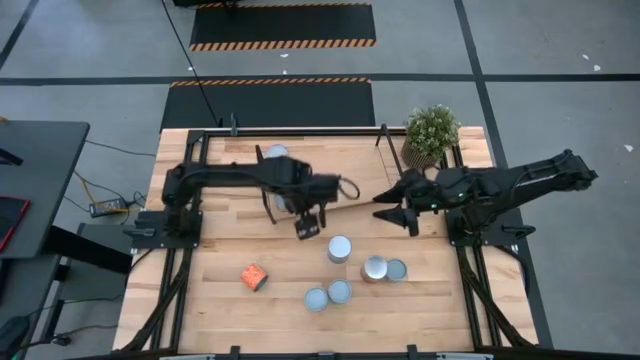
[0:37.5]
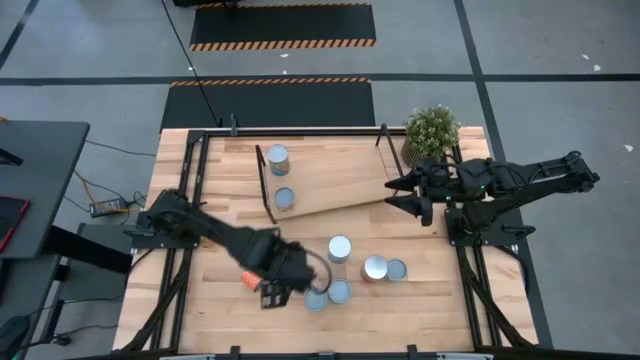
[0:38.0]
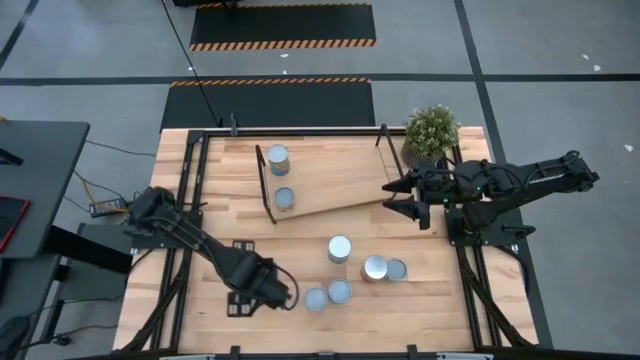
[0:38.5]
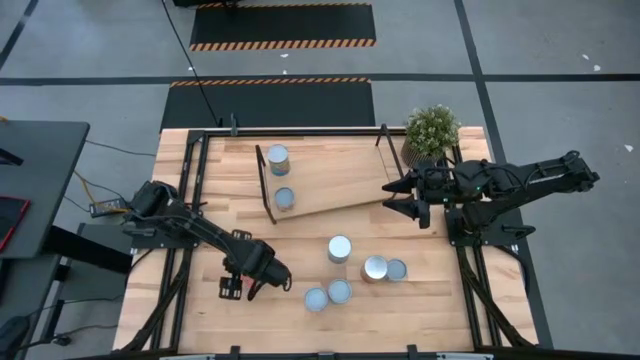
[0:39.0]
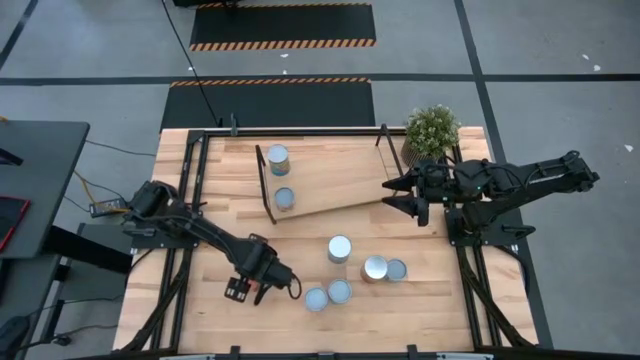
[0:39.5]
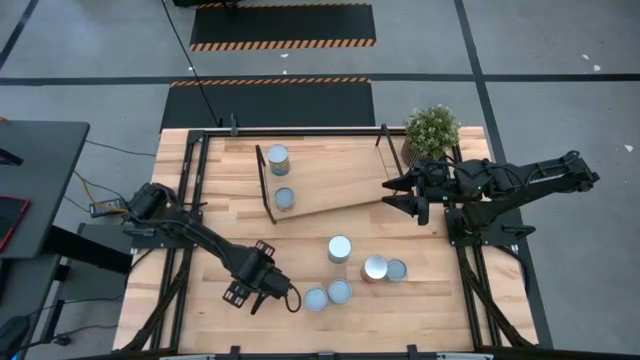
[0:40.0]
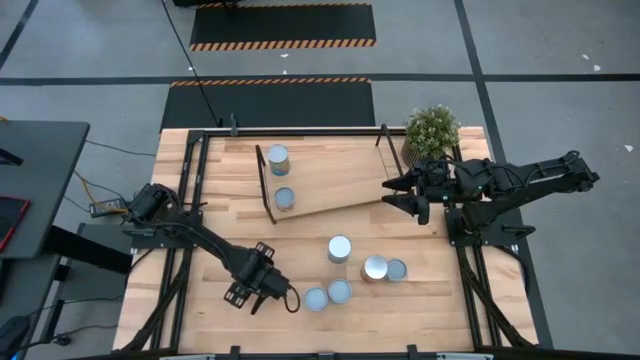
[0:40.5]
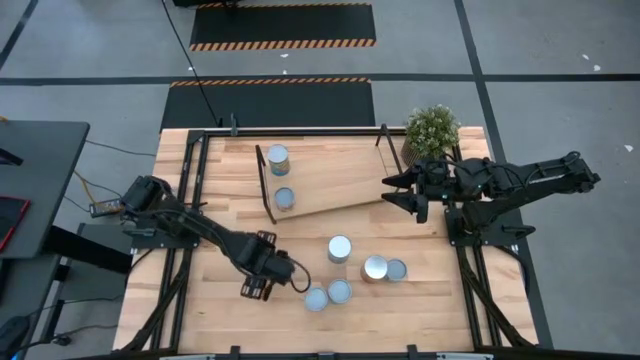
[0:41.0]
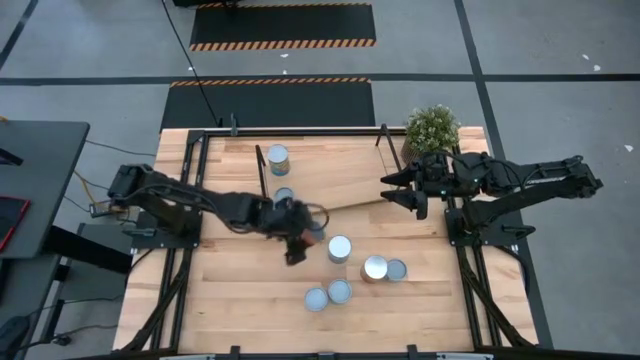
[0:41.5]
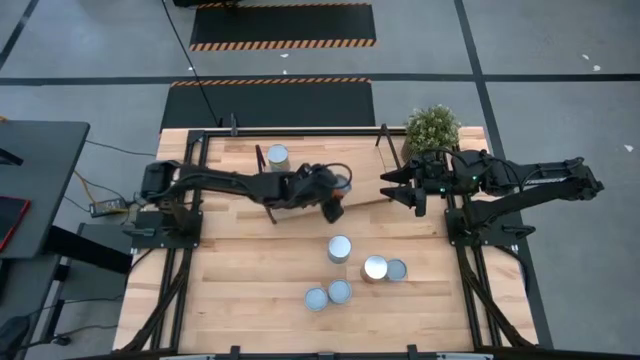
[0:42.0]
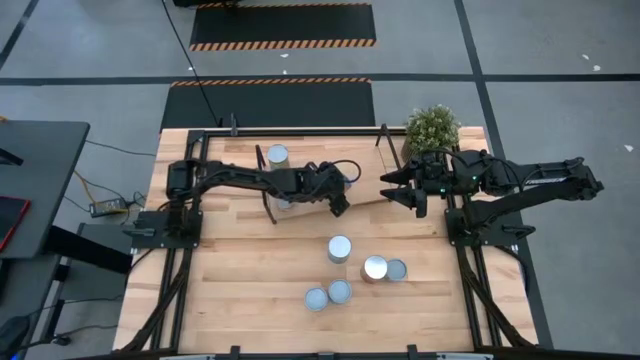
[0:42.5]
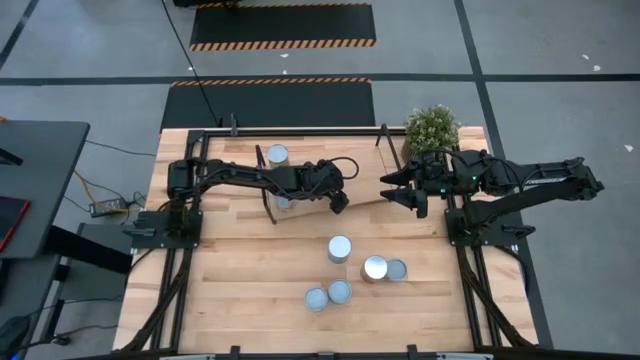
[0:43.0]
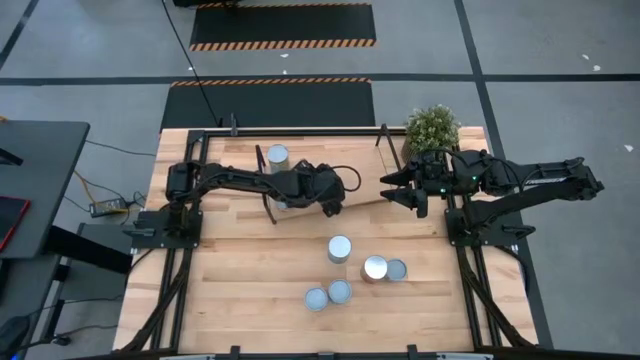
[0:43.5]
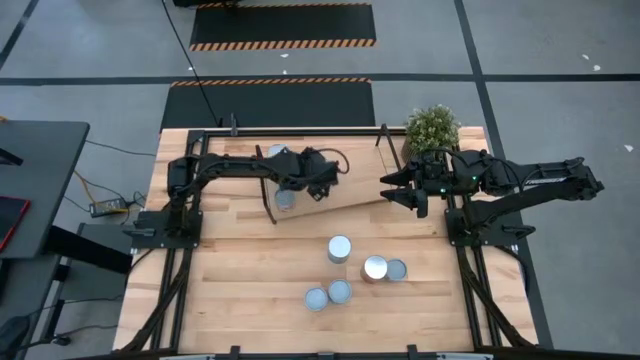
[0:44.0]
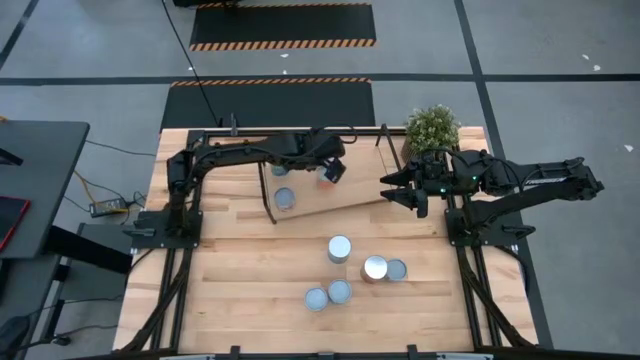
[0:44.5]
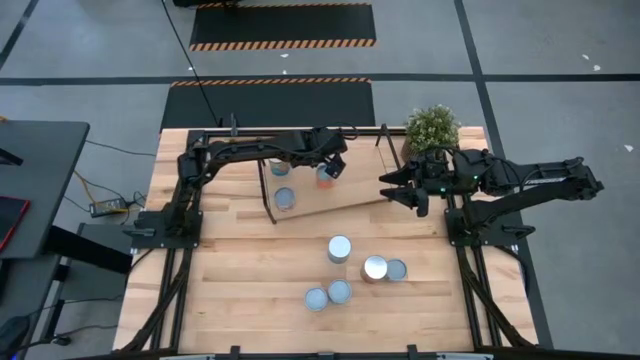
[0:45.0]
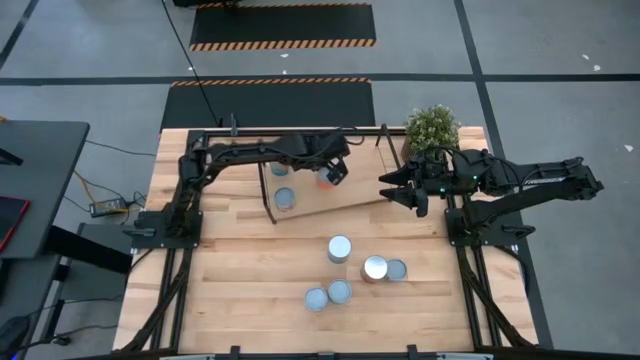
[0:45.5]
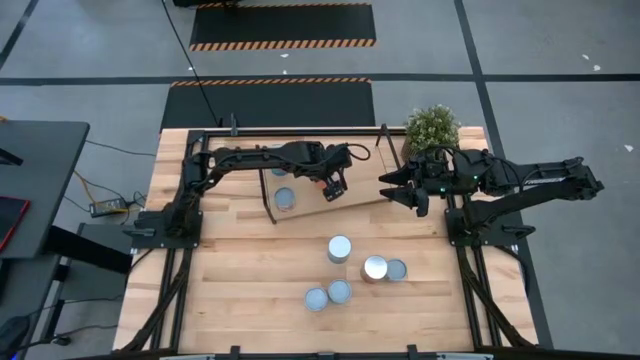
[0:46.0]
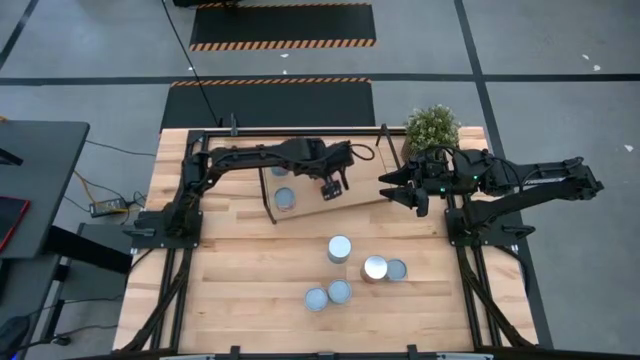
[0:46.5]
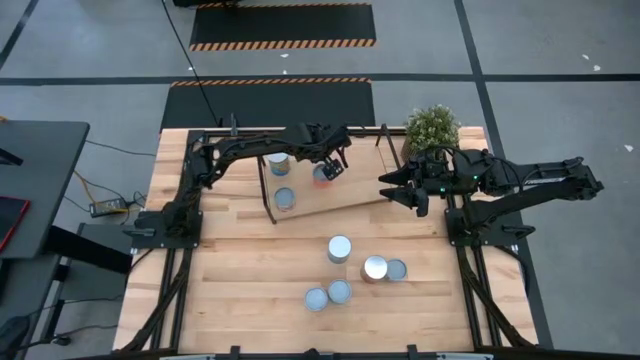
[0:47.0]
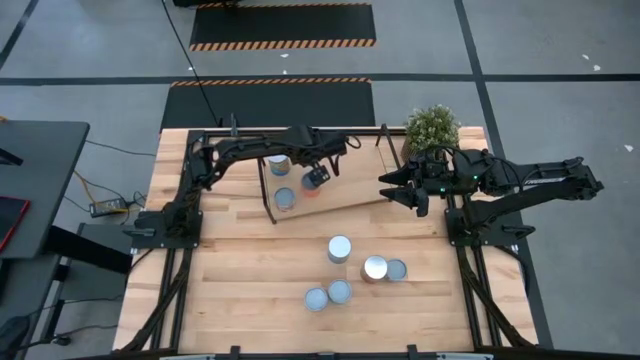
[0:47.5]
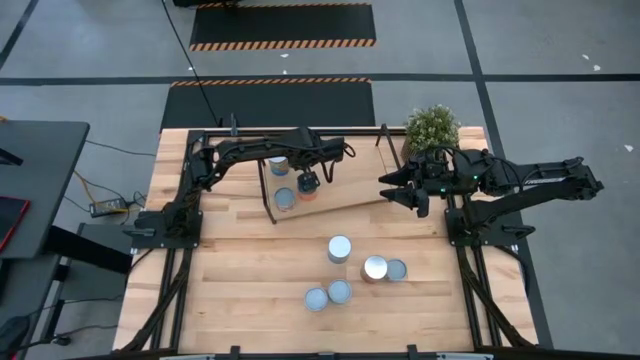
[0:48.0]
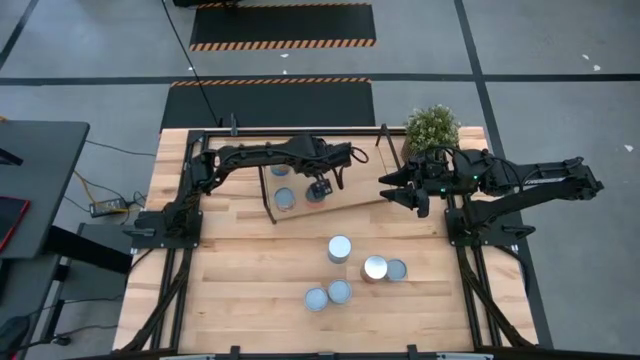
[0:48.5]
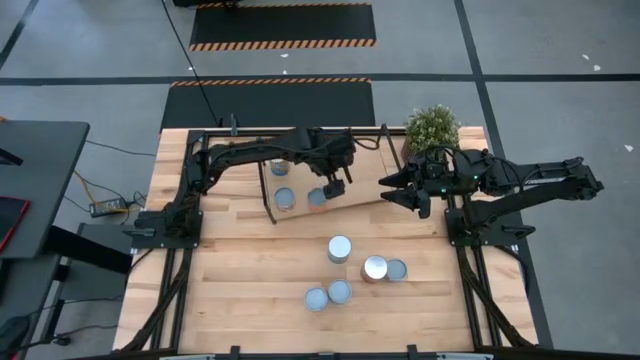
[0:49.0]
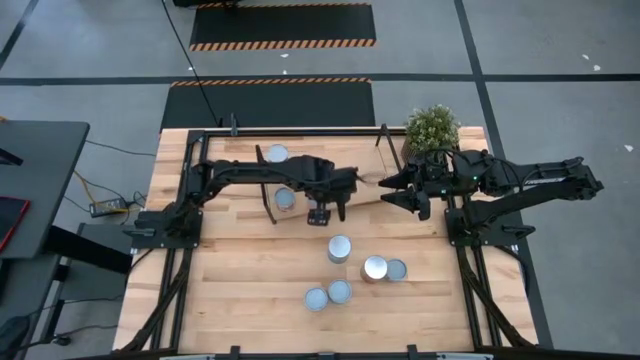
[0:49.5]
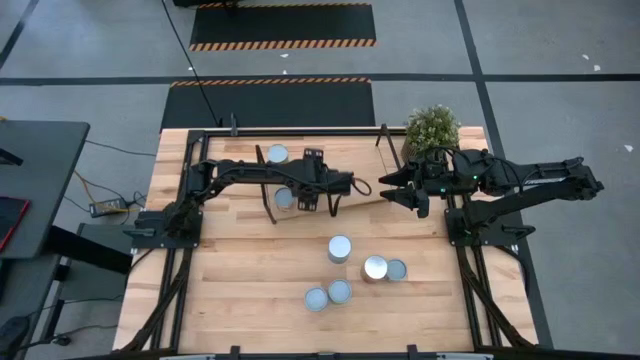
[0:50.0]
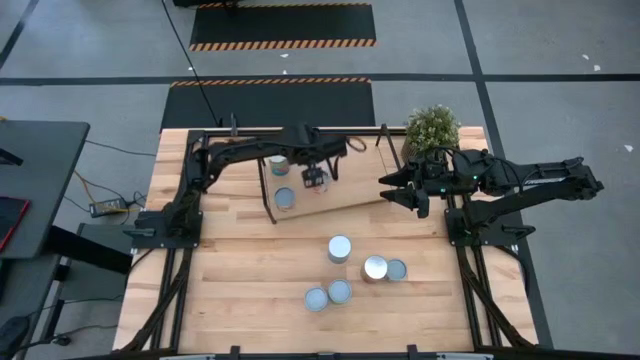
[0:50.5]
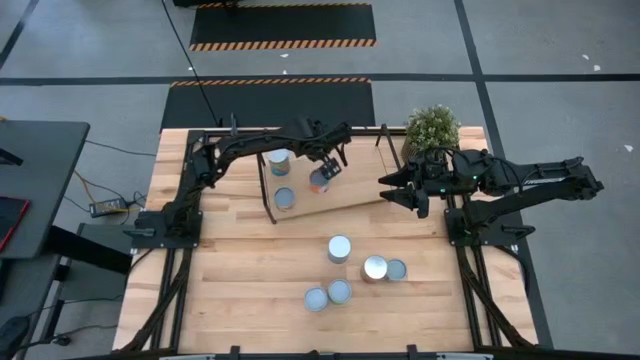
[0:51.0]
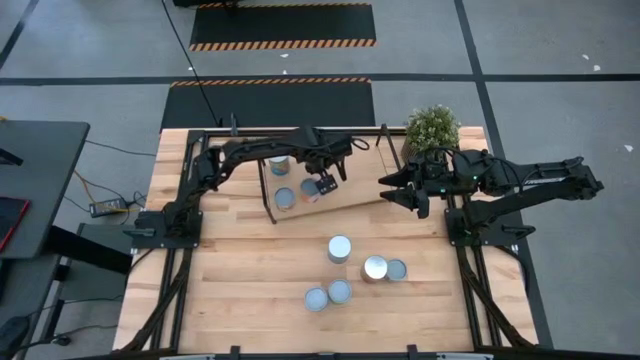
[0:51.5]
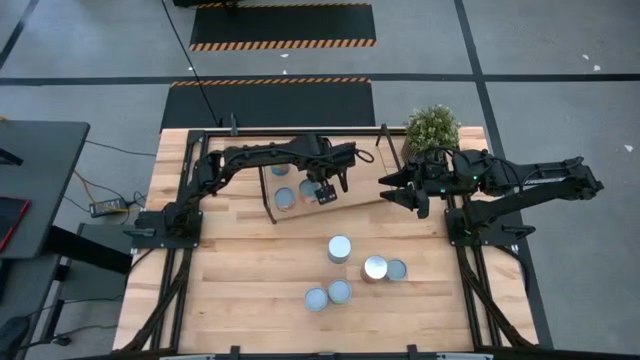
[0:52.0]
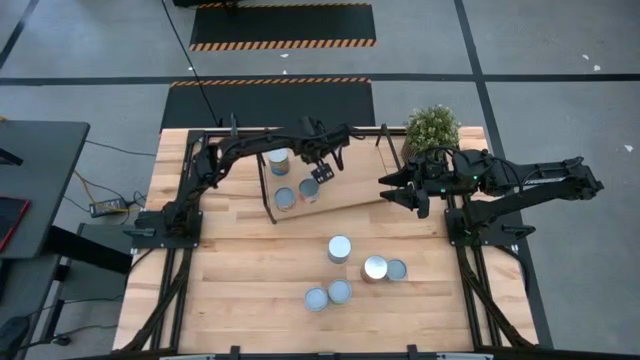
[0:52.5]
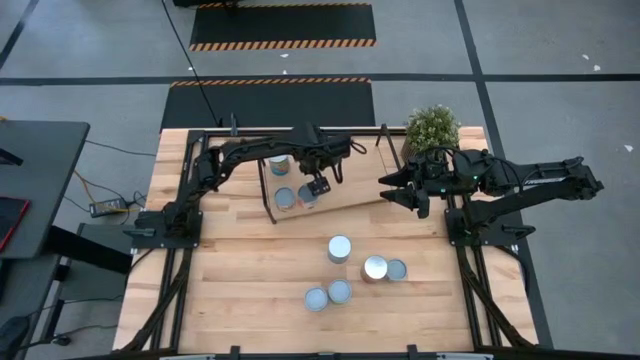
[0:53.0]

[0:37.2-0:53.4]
Task: Pick and place cans onto a shelf
Put the canned meatballs on the shelf
